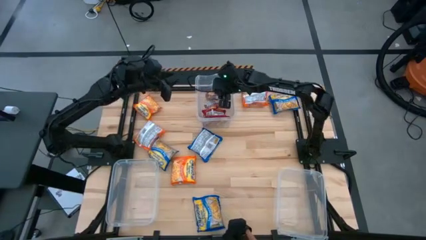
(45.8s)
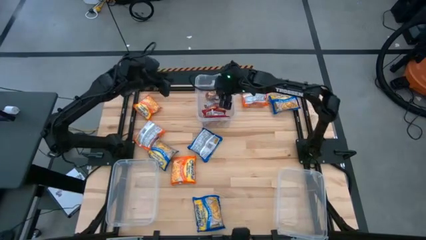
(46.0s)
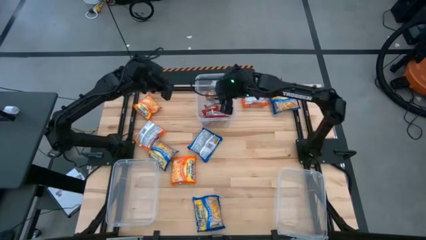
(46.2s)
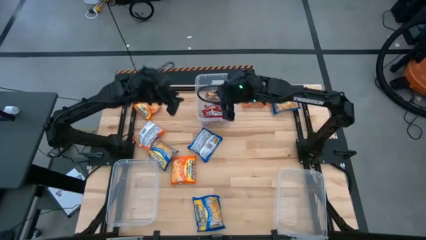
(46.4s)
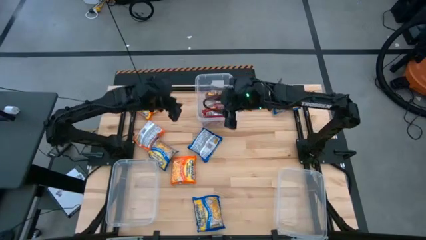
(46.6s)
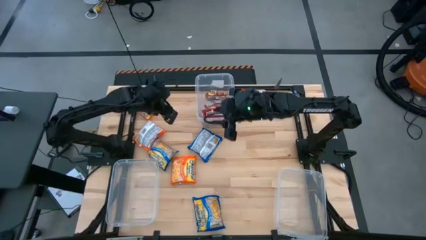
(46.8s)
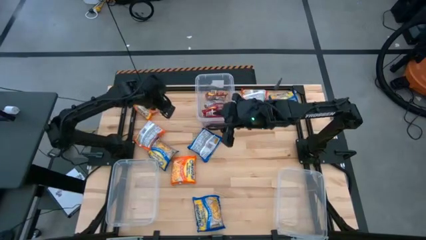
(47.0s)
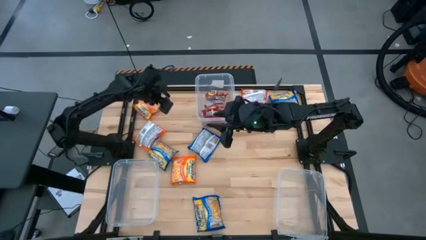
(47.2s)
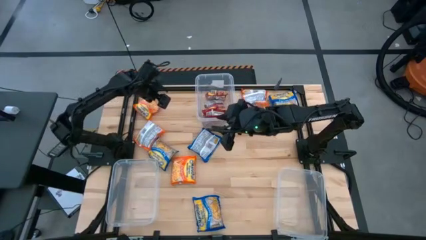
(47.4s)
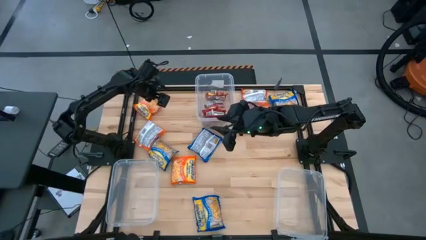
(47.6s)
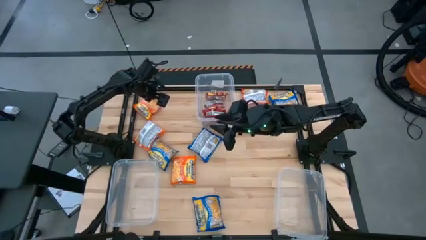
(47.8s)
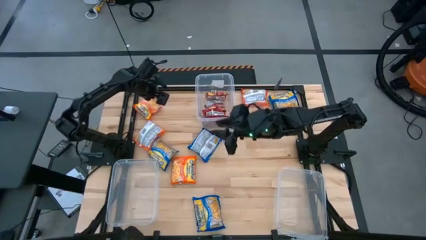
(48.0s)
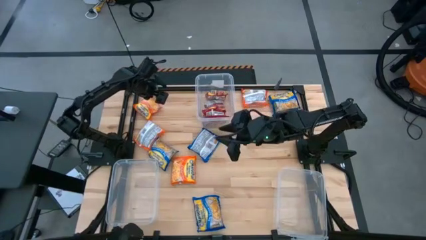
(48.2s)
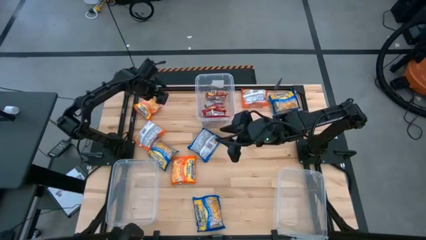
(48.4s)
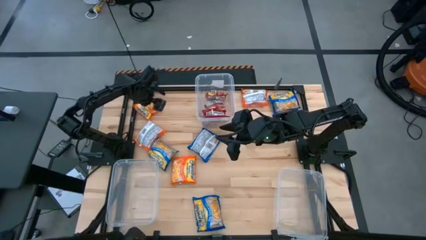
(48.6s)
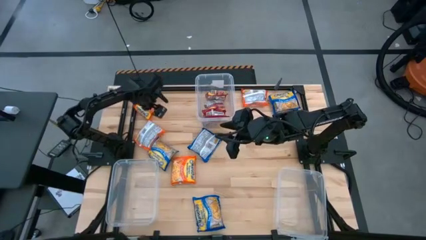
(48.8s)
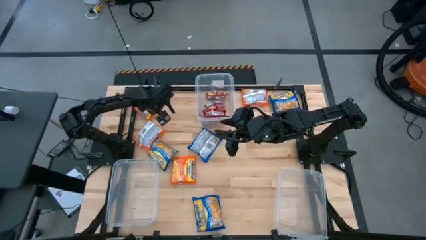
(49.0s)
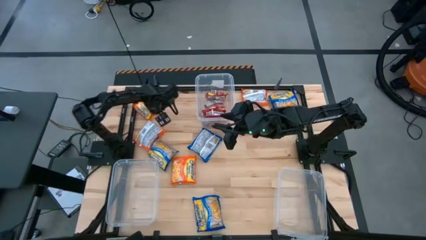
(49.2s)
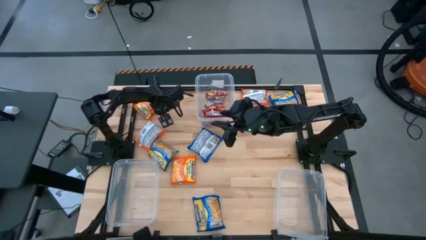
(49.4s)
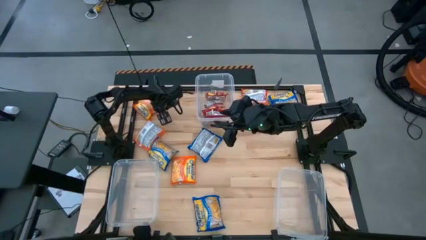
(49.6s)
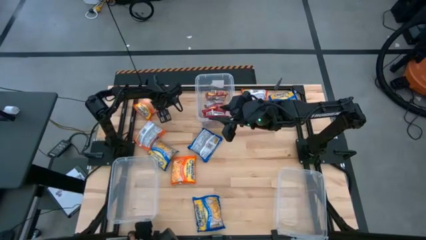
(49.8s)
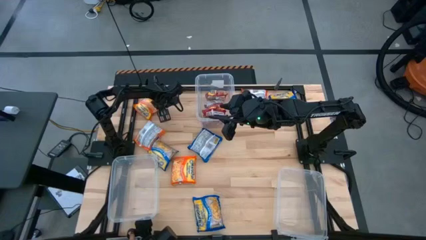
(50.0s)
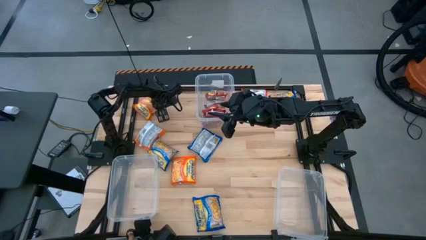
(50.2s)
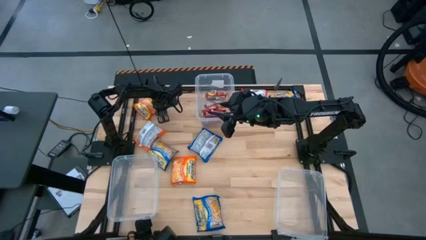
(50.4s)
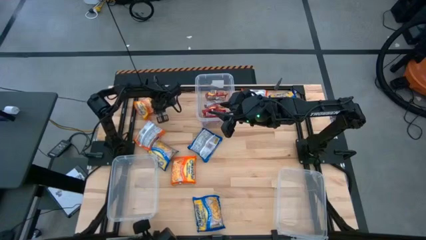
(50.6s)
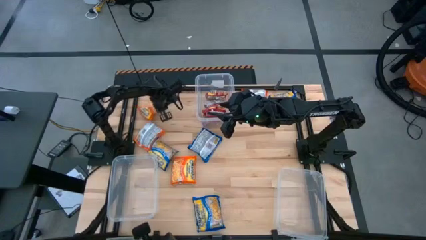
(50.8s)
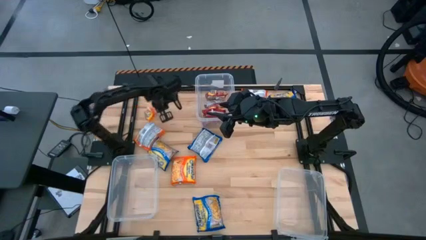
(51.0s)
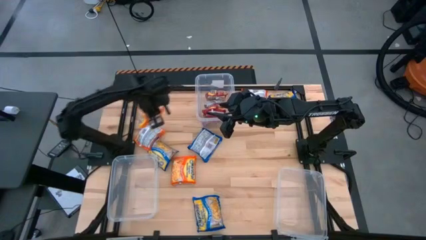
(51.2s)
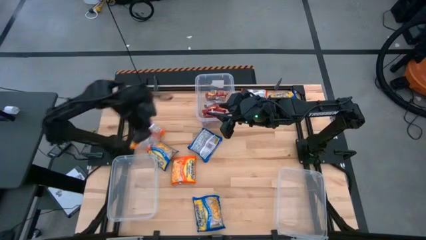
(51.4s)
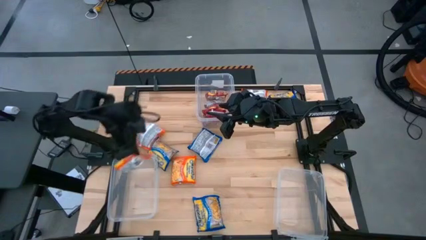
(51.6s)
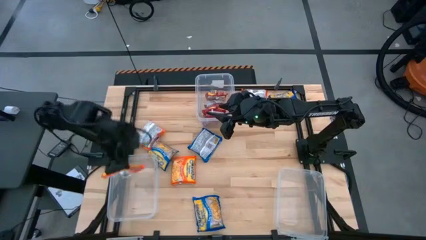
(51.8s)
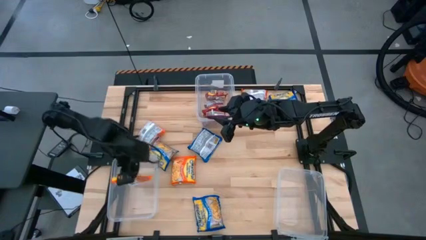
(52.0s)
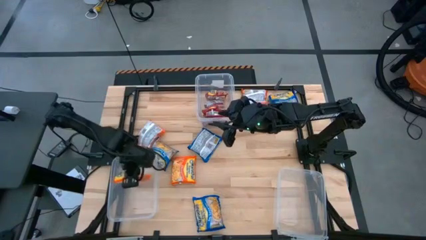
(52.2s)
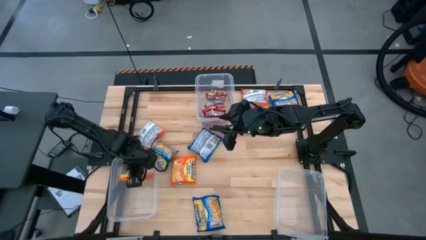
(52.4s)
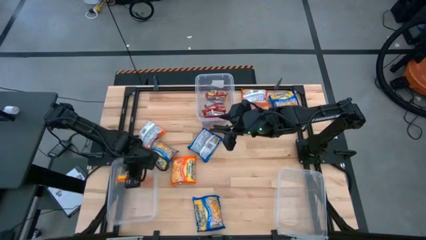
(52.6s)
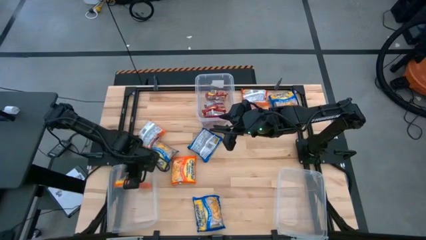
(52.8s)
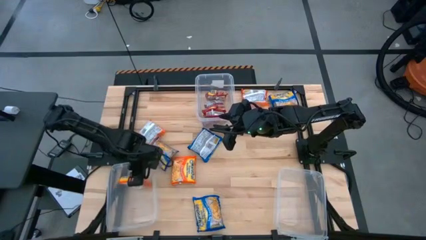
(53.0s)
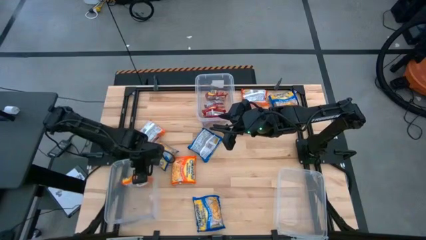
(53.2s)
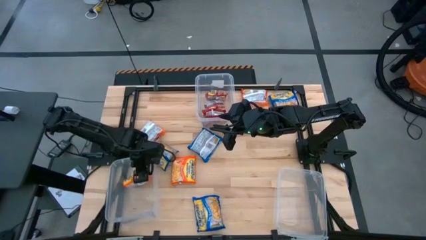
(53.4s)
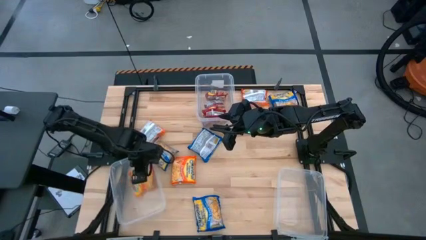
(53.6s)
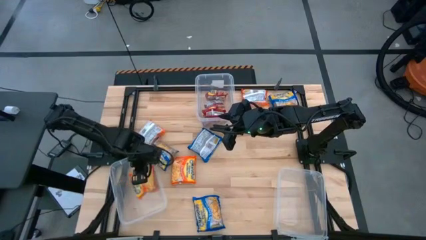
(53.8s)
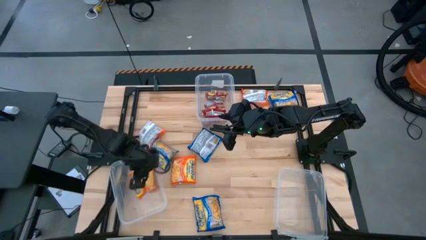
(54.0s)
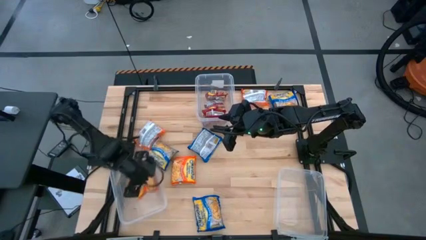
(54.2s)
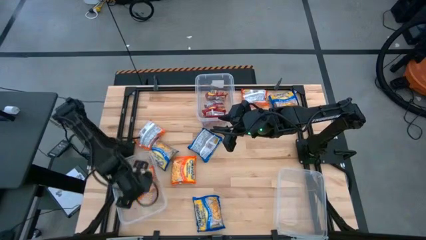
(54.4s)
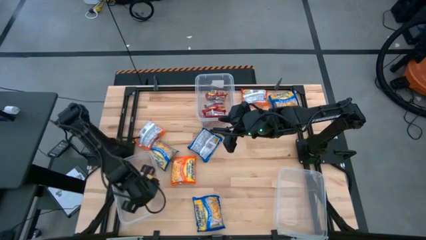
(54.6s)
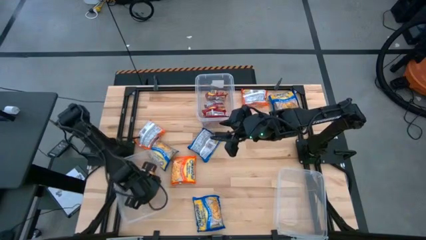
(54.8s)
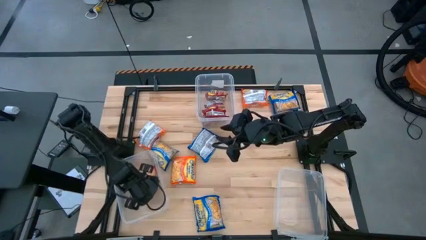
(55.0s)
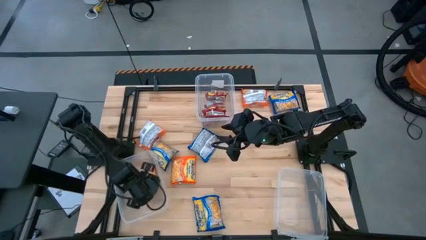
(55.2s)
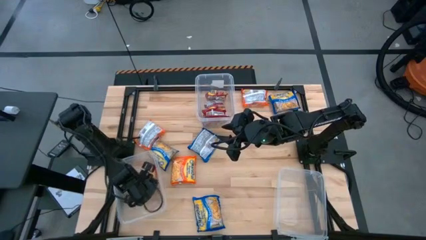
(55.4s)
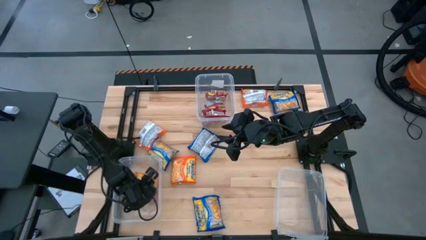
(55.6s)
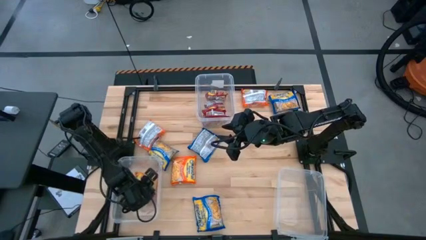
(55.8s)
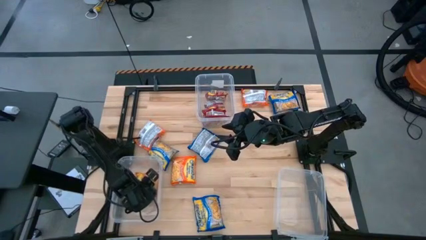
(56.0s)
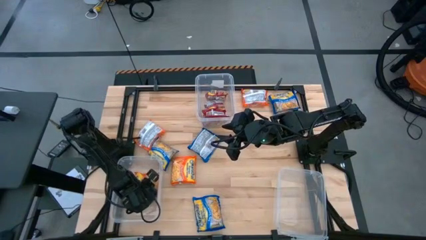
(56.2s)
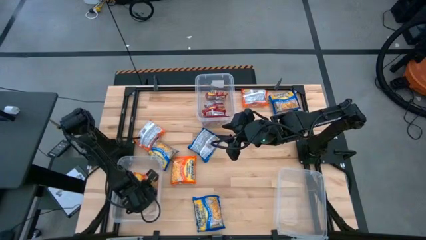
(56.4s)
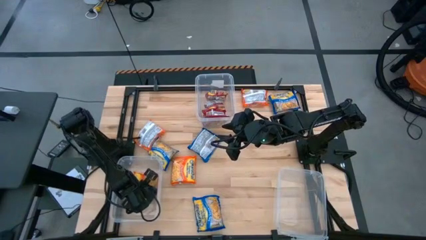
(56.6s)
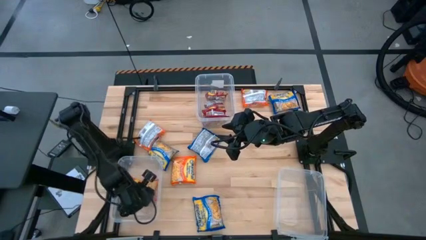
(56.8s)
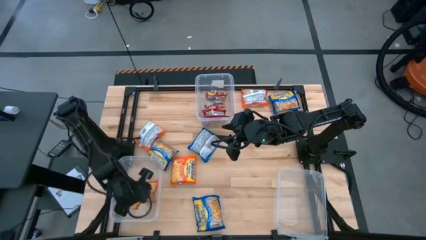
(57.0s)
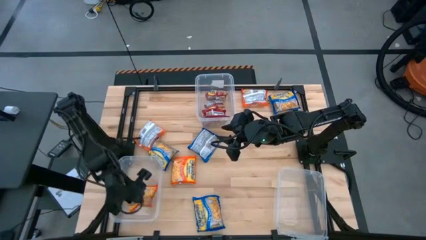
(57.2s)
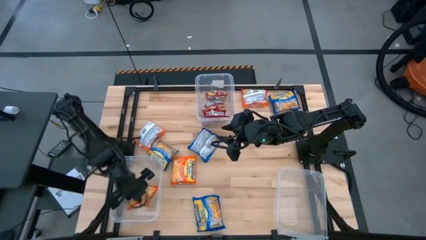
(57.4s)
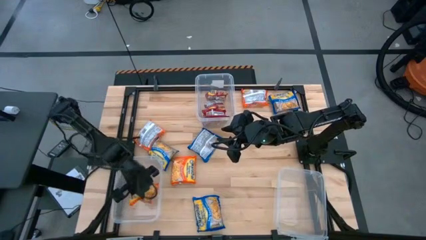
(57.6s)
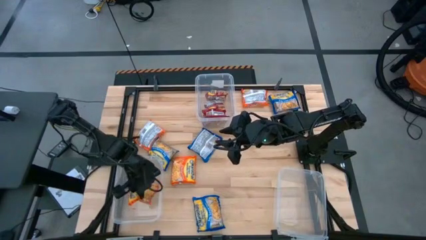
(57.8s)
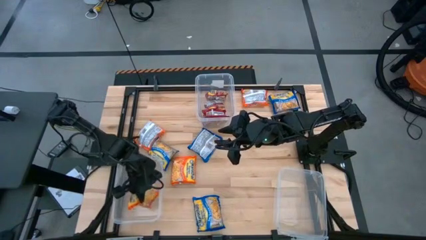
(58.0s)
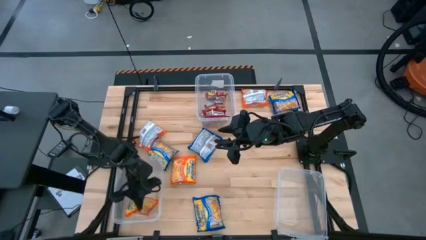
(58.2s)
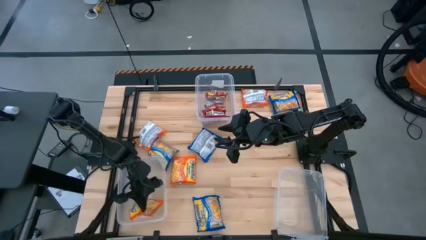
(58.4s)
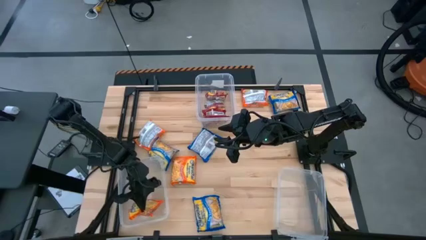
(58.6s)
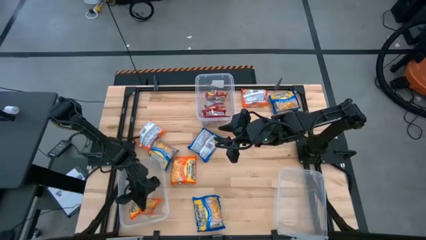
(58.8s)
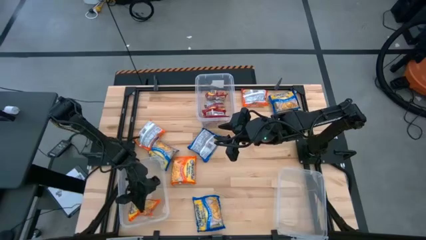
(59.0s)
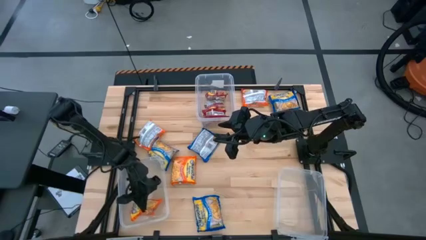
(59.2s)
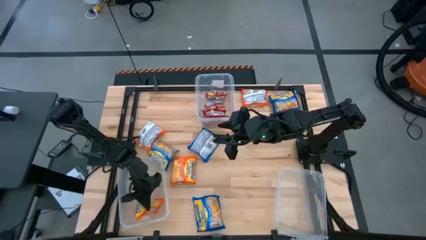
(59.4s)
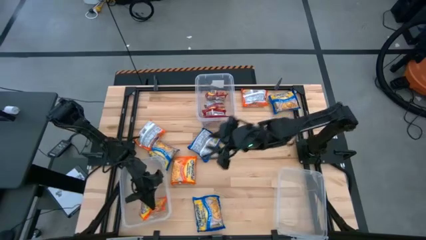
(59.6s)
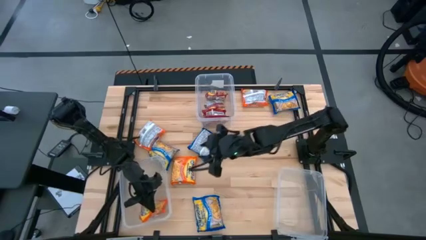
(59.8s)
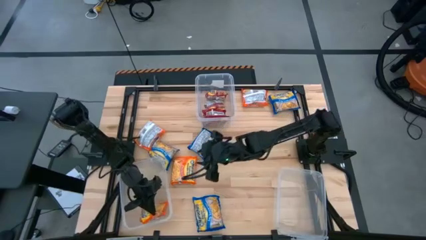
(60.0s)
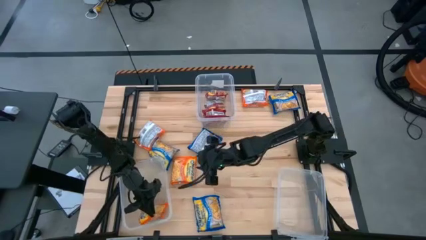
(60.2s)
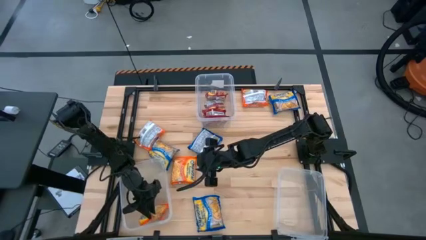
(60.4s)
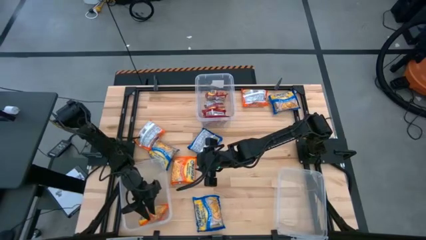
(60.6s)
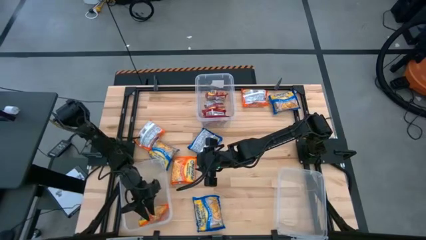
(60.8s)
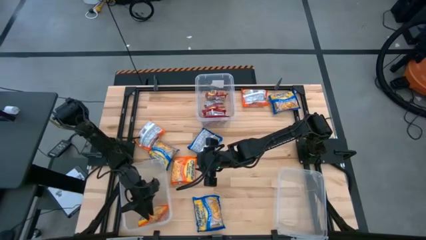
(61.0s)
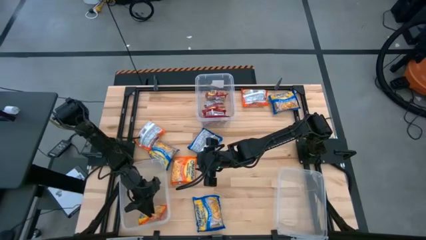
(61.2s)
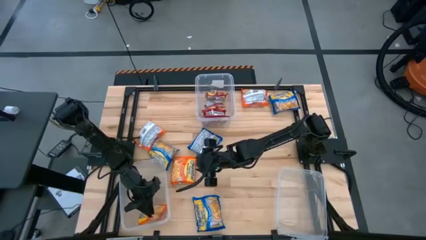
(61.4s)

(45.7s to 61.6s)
Task: Sort Maruchan noodles
Put the orange noodle pack into the bottom left transparent bin
